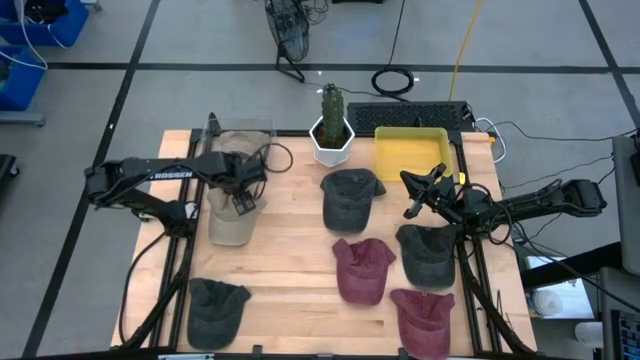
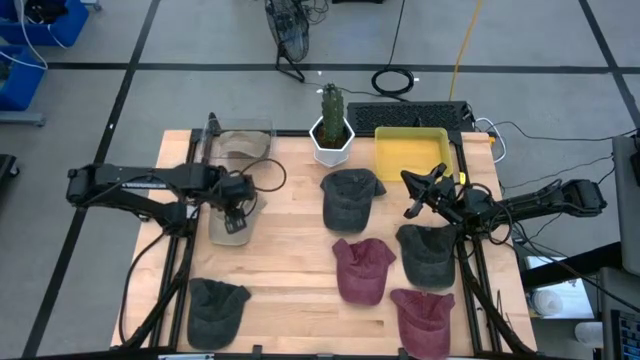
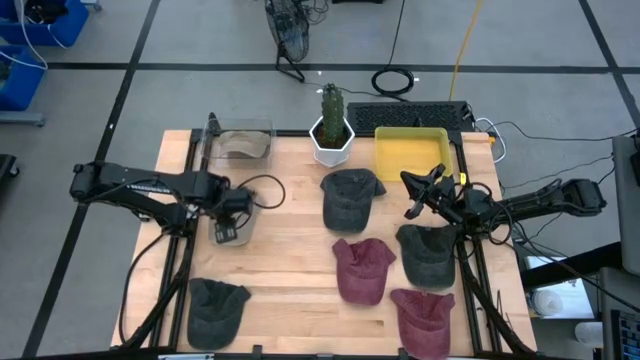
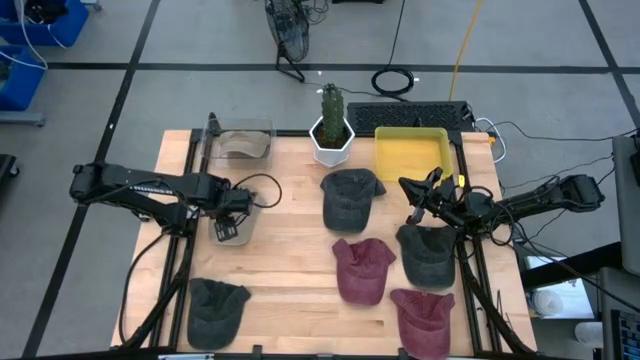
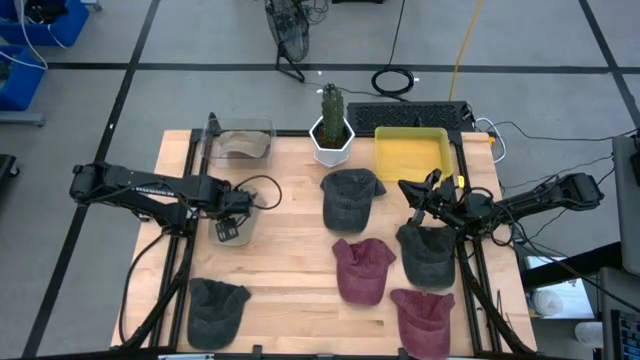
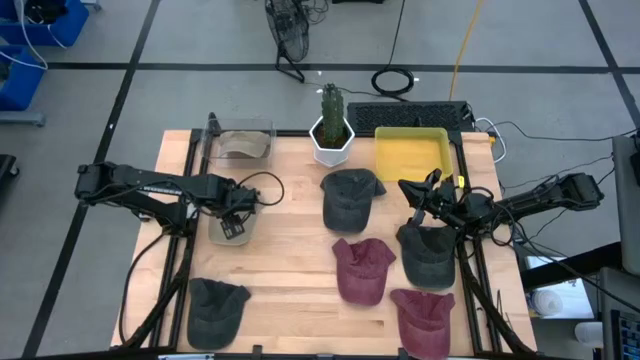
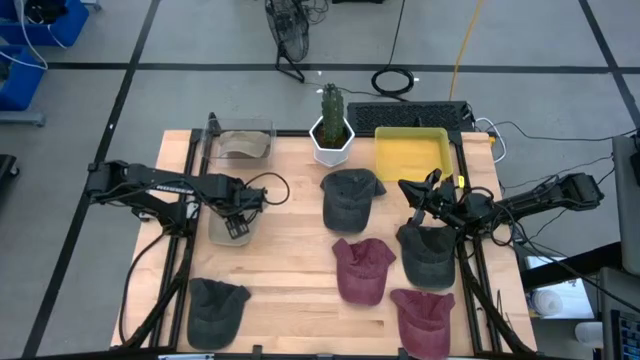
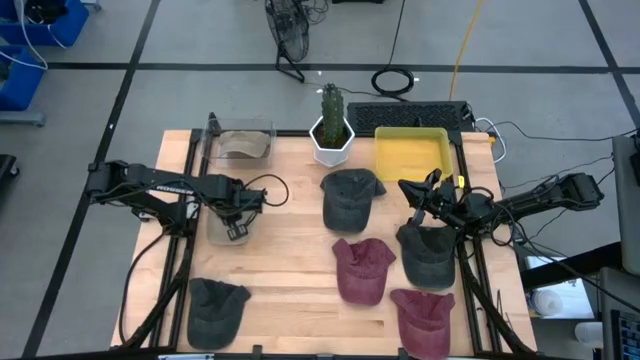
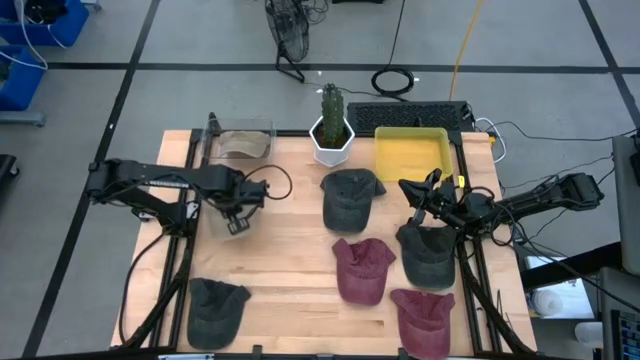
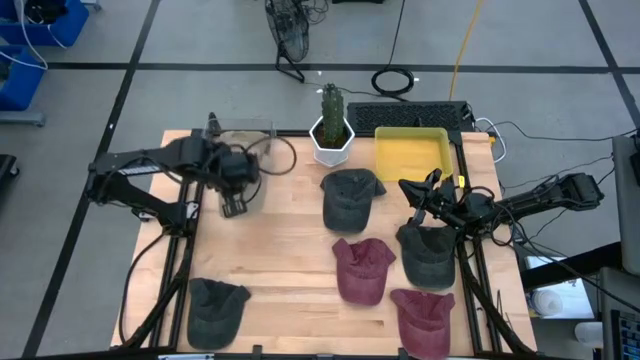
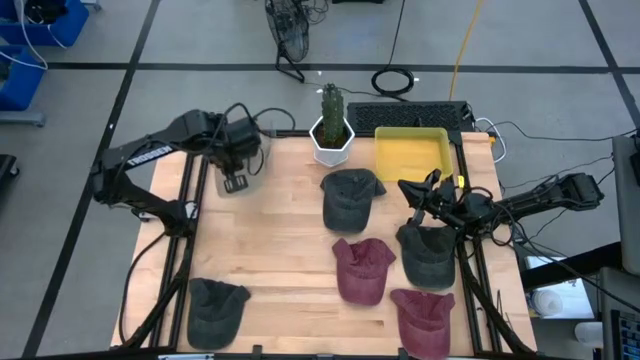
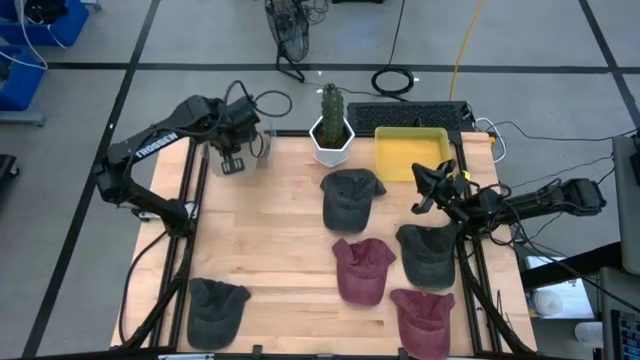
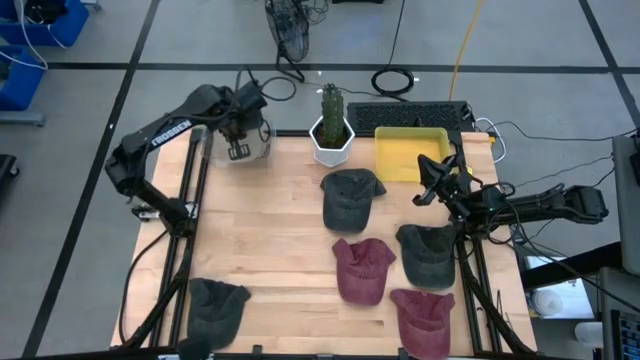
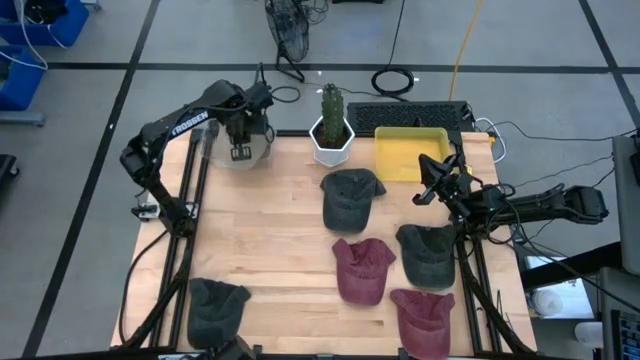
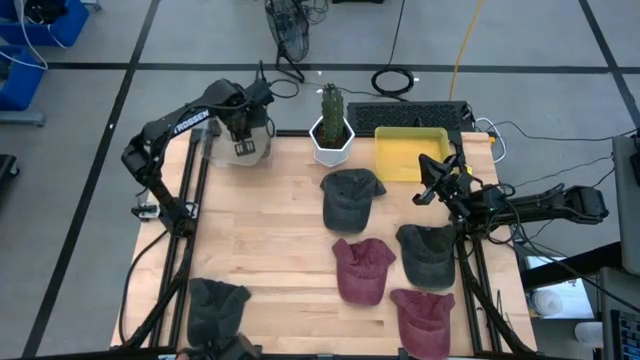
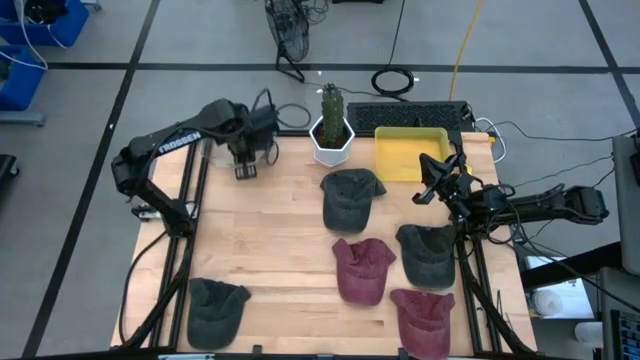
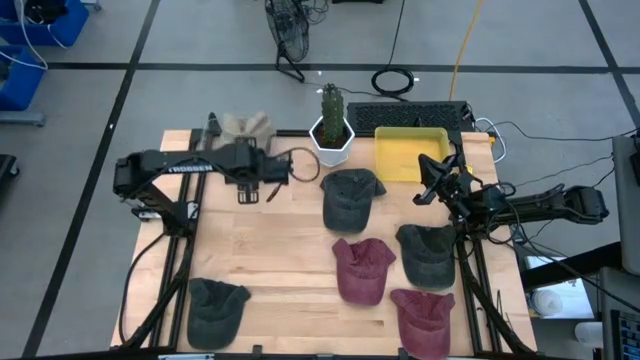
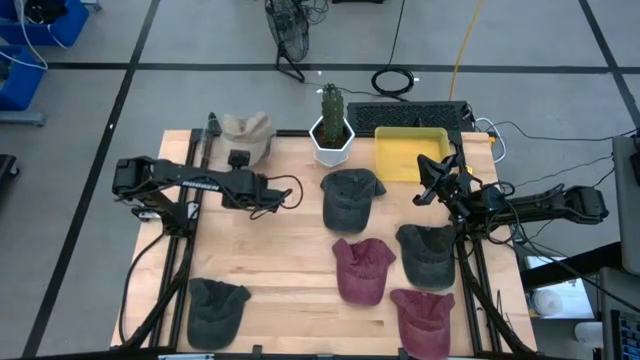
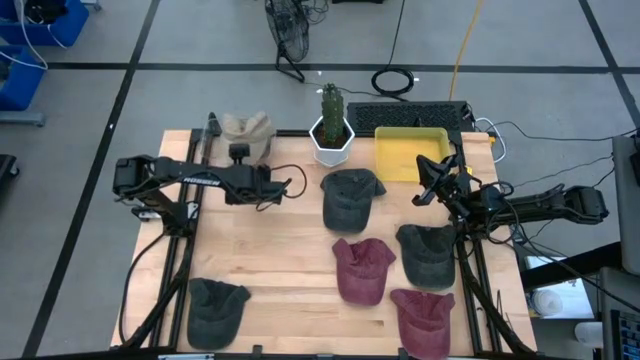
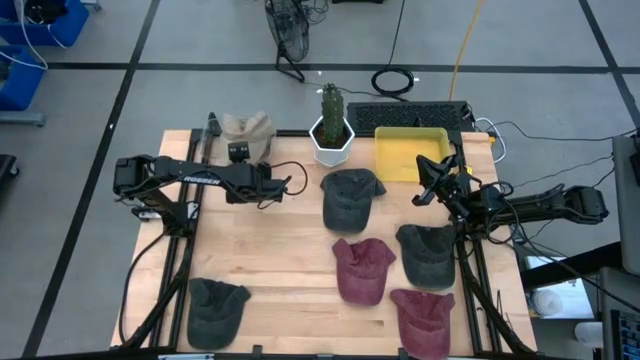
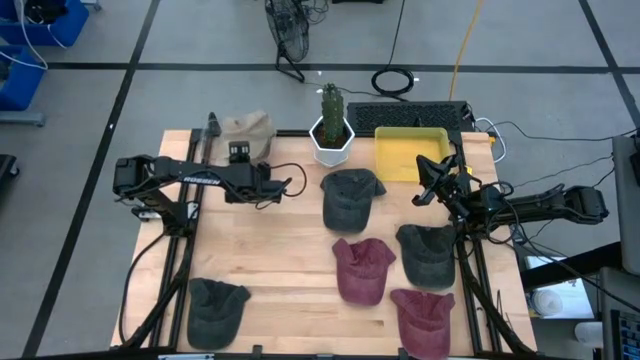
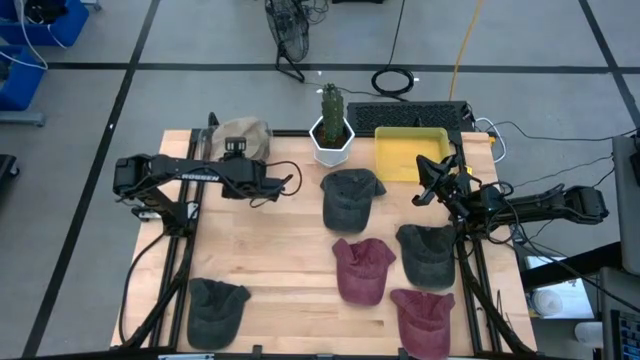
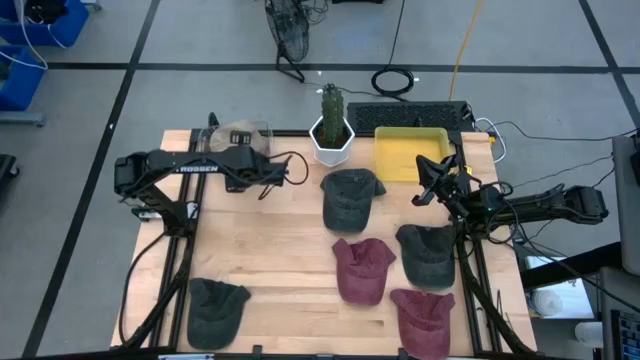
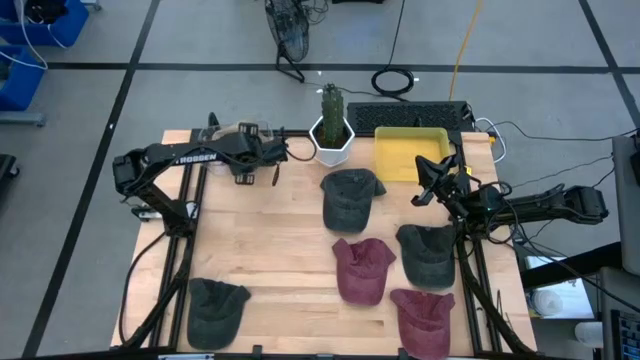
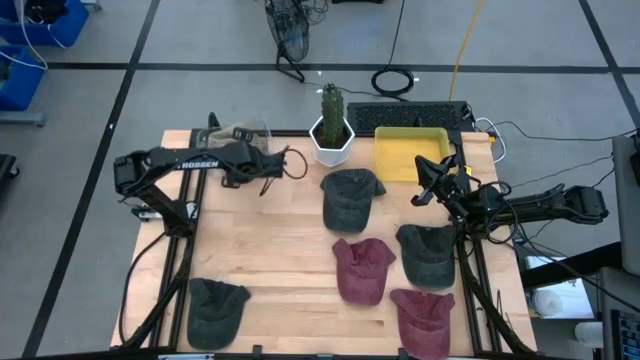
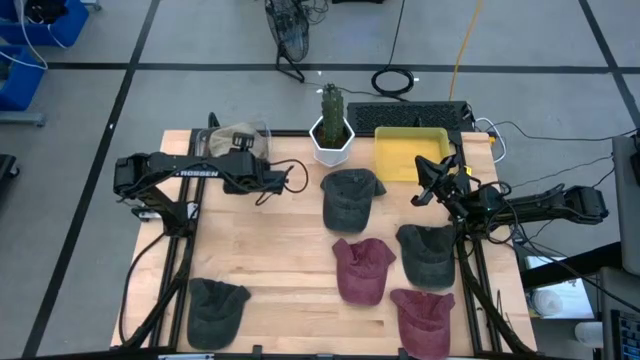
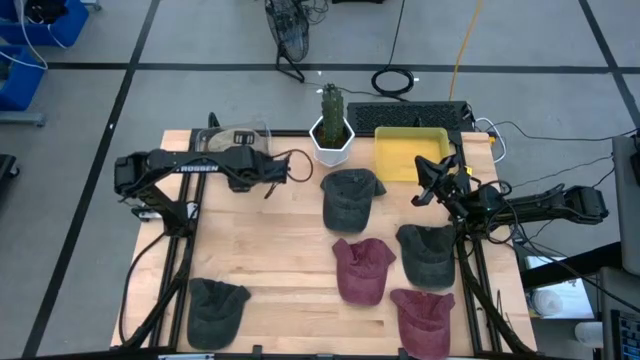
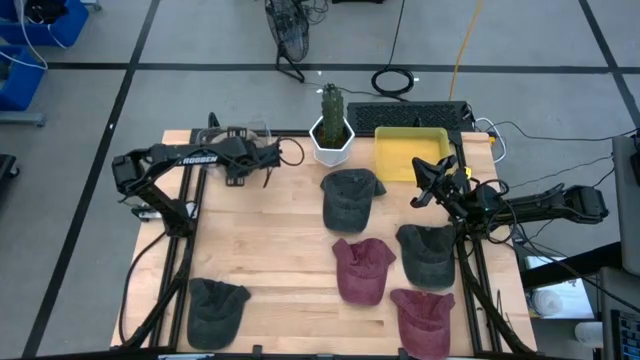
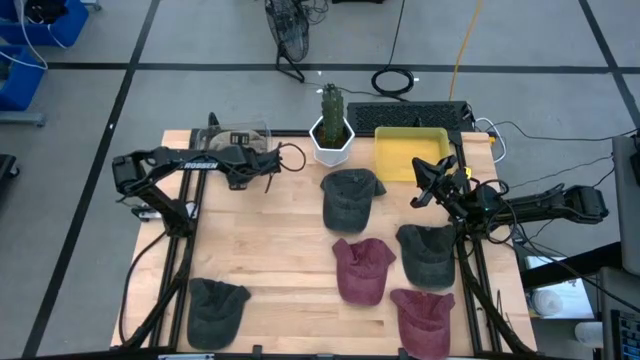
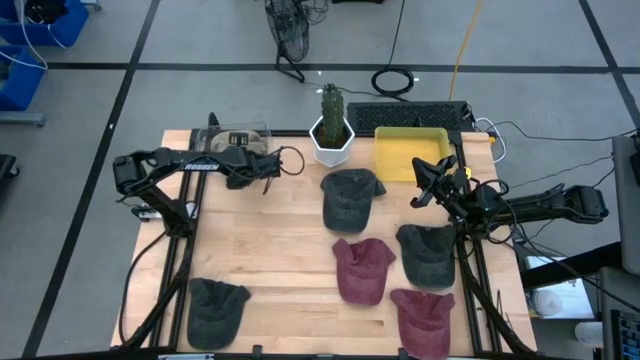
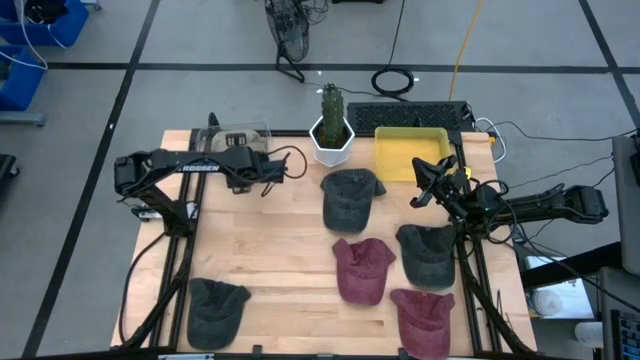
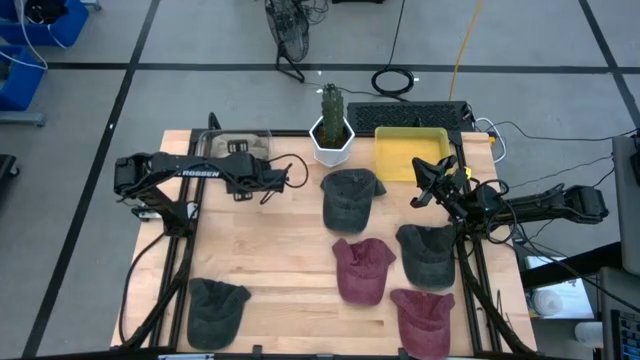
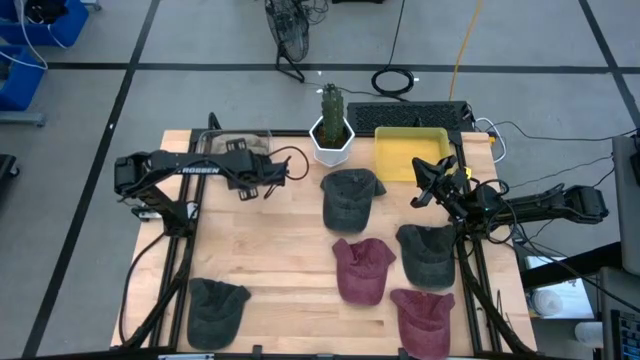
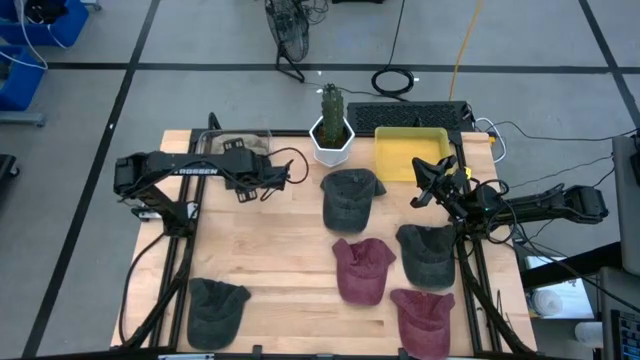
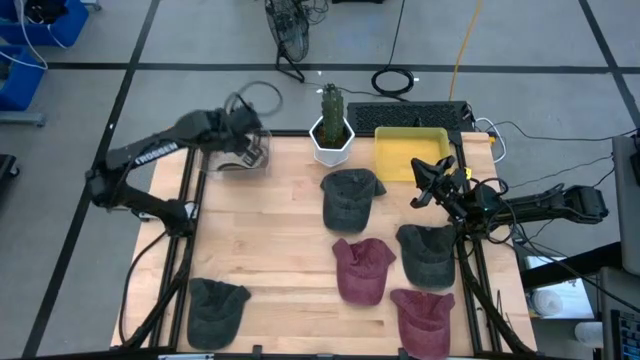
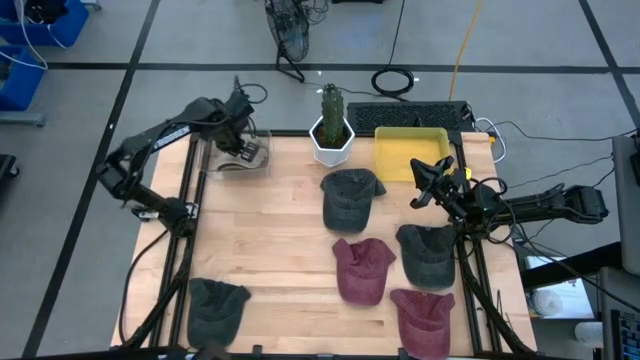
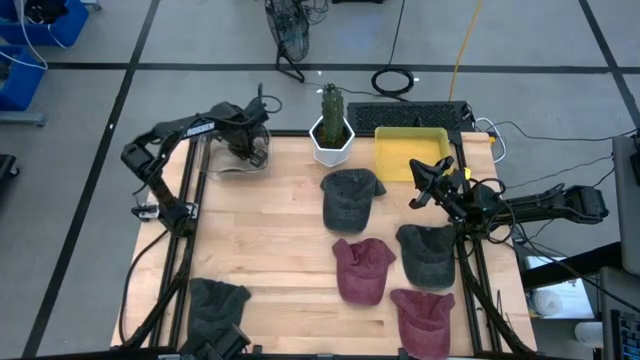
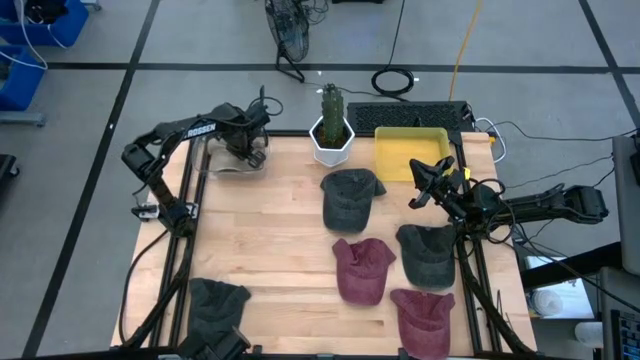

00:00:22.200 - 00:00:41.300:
Task: Pick & Place hat
Put the brown cap into the transparent bin

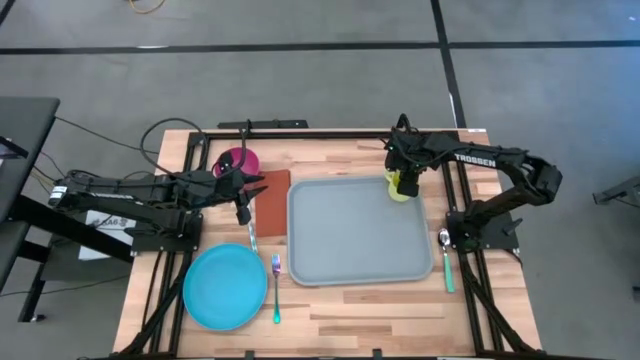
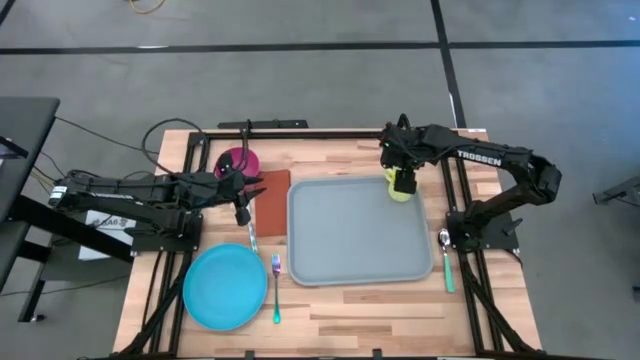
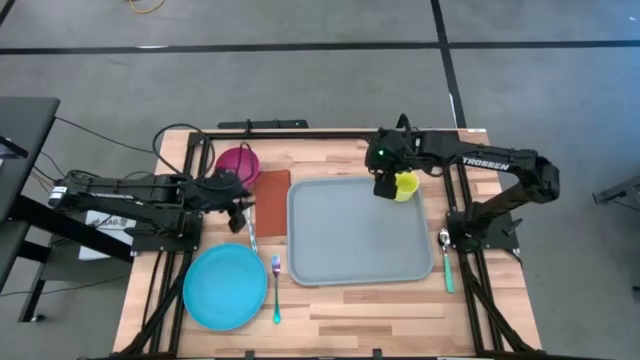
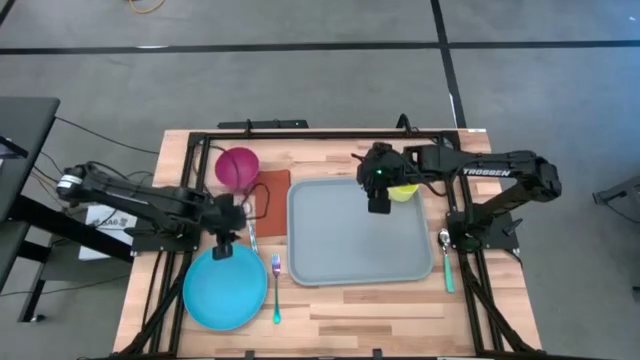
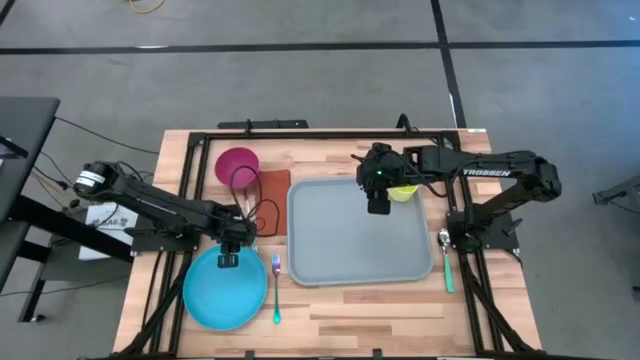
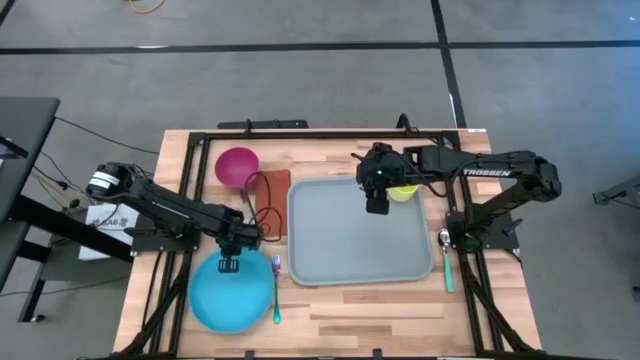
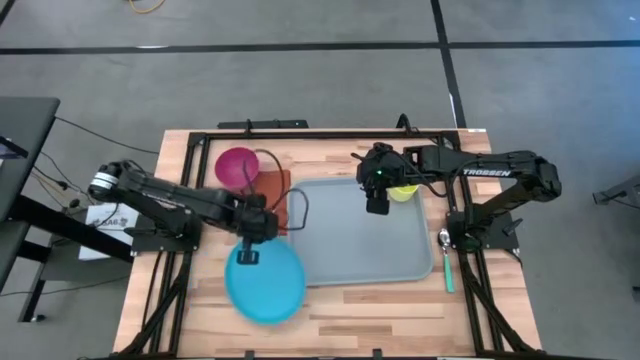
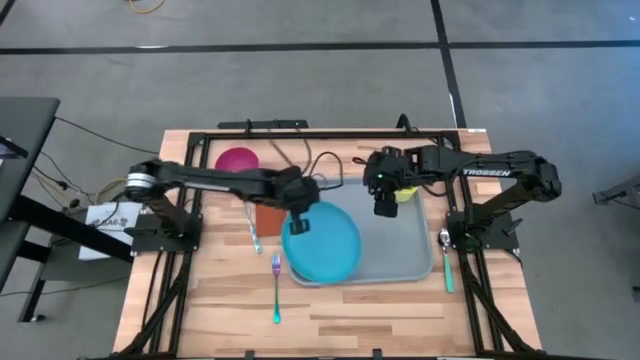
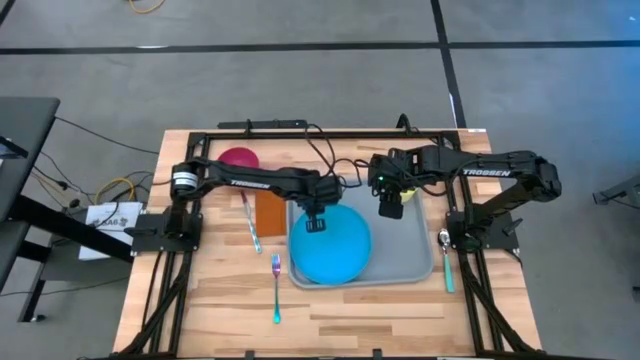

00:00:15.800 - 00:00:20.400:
Task: Set up tray
Put the blue plate on the gray serving tray to the bottom left of the yellow mug
